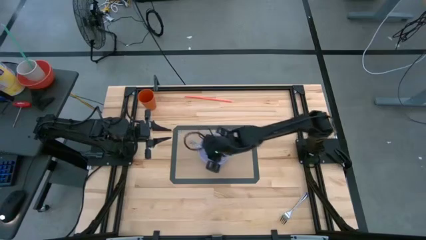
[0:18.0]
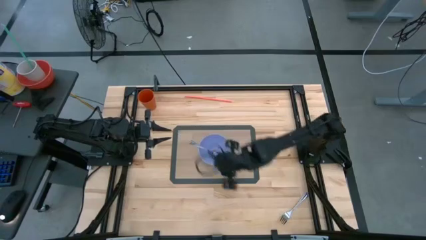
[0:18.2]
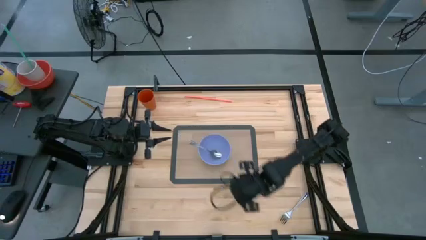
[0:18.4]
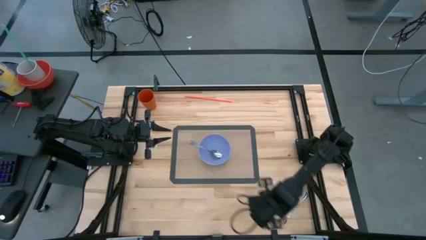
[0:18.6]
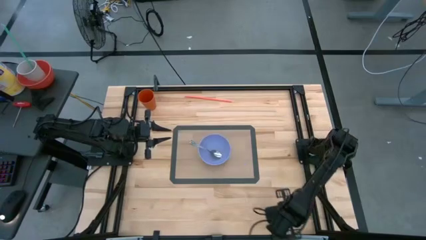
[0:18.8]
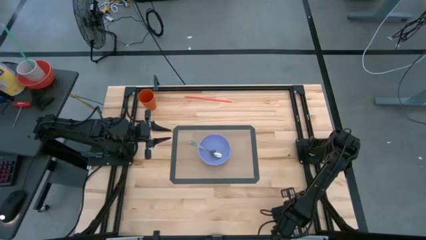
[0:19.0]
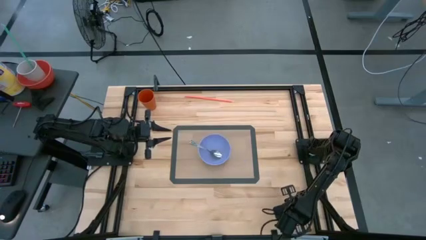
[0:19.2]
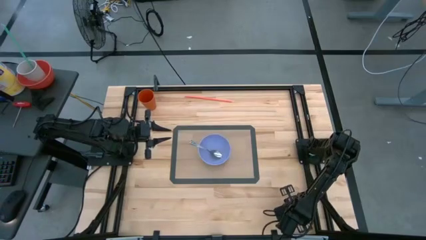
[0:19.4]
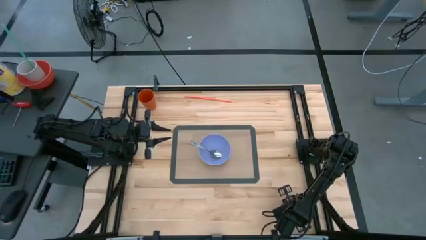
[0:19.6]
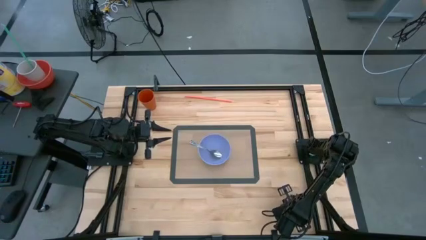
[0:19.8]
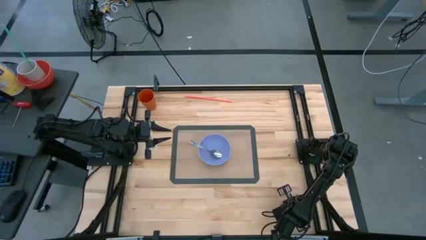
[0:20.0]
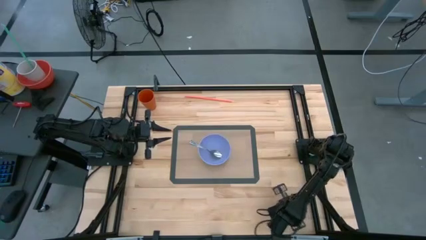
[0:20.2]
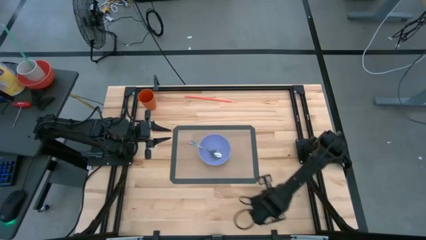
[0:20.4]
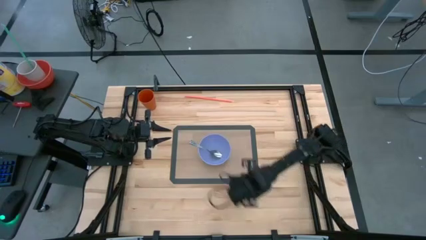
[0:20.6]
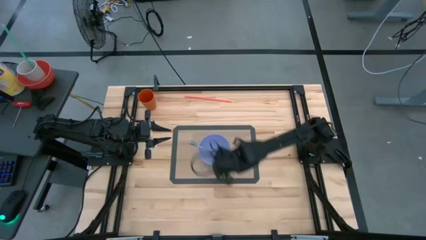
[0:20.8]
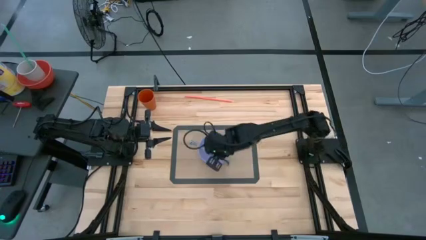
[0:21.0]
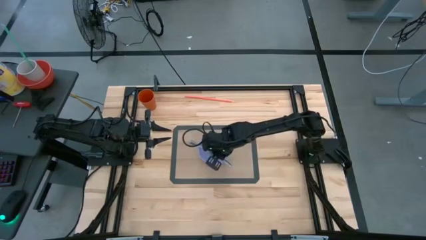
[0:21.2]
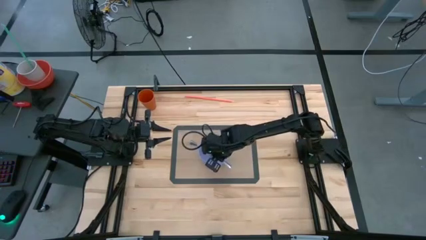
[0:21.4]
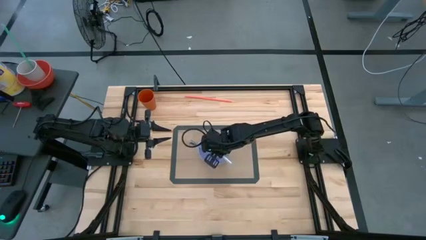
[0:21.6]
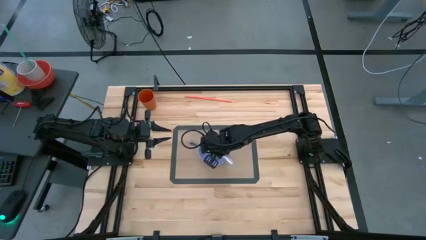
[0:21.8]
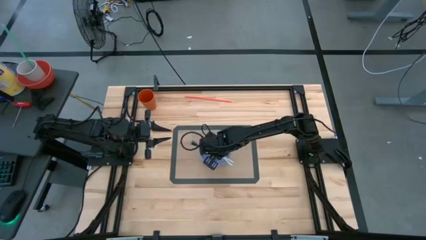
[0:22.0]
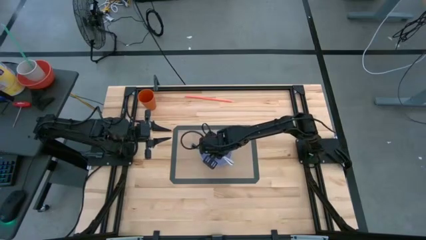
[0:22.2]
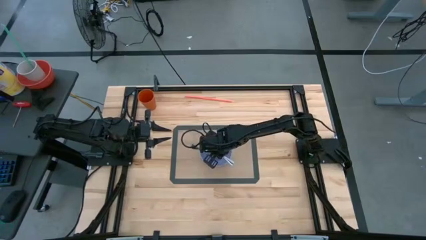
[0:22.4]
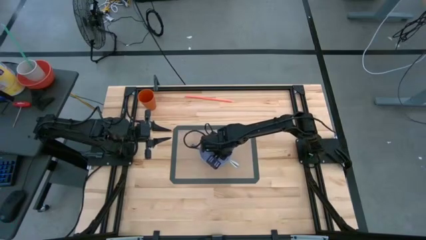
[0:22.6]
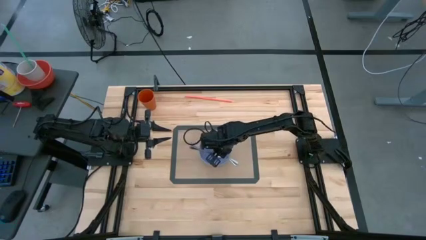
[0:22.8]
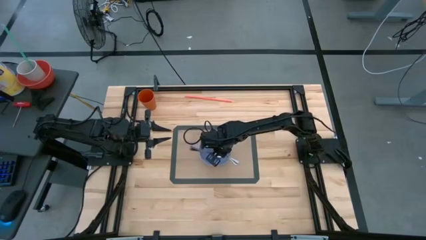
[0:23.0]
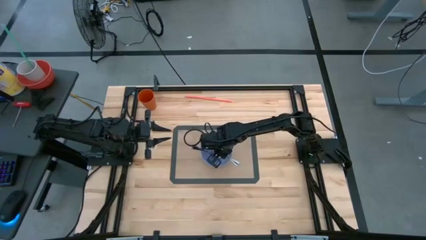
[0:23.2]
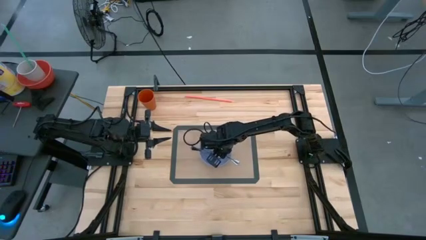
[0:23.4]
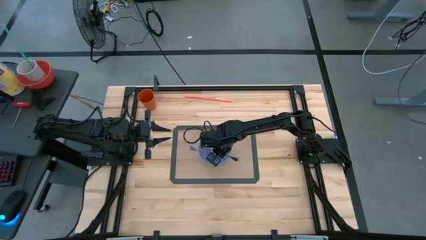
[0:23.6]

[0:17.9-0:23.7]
Task: Pick & Place Utensil
Put the silver fork into the violet bowl

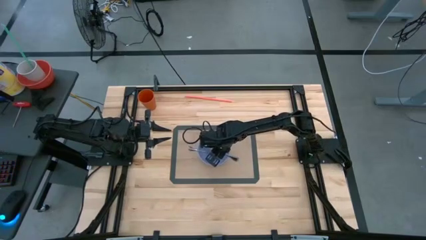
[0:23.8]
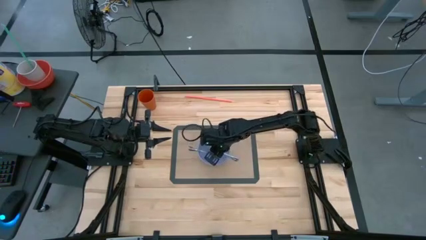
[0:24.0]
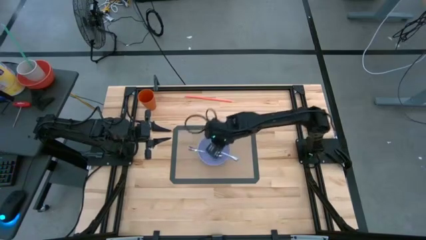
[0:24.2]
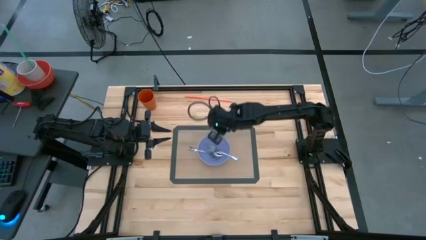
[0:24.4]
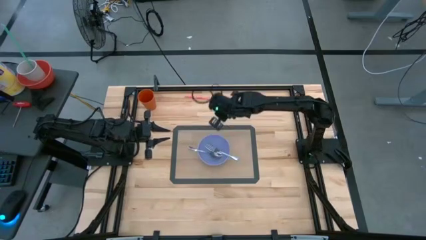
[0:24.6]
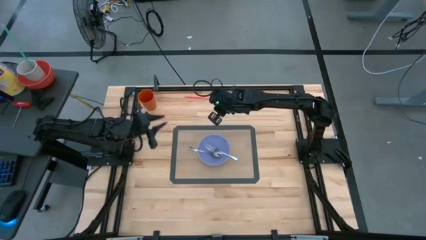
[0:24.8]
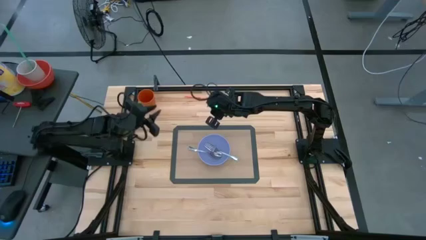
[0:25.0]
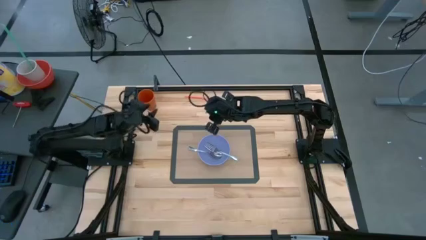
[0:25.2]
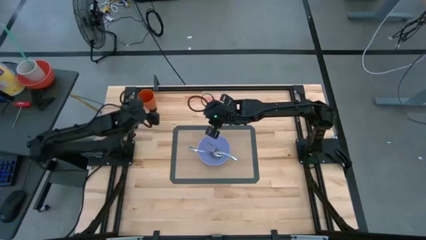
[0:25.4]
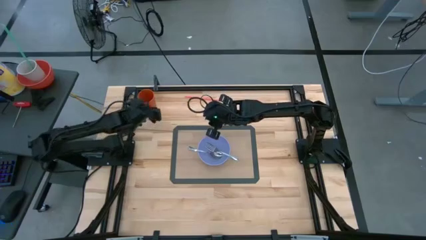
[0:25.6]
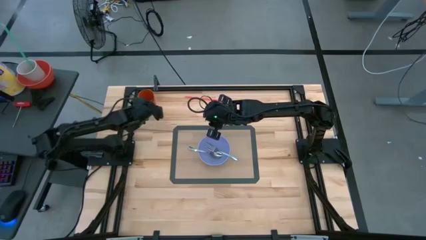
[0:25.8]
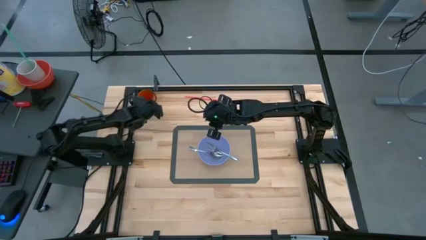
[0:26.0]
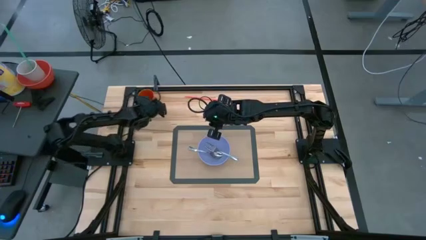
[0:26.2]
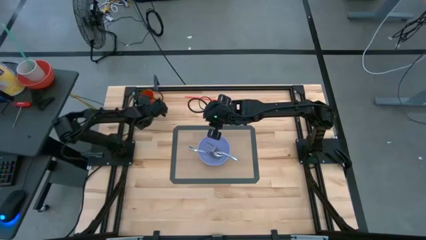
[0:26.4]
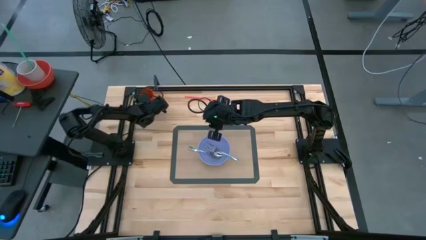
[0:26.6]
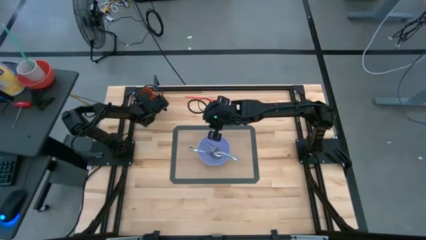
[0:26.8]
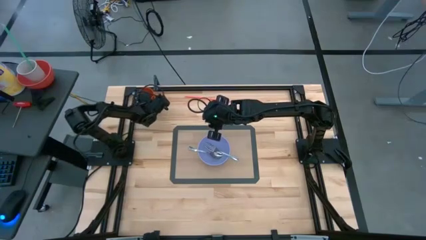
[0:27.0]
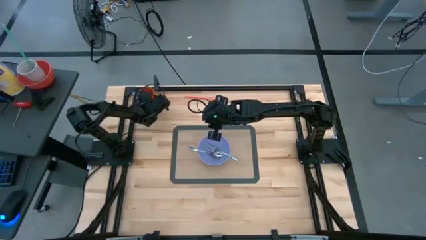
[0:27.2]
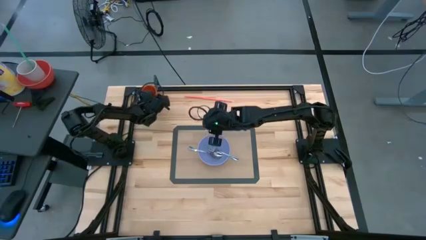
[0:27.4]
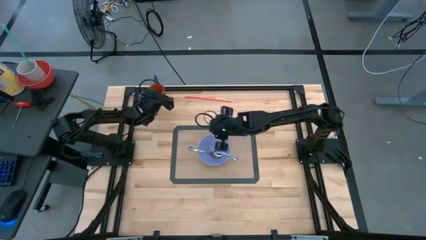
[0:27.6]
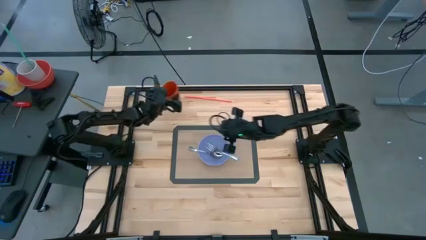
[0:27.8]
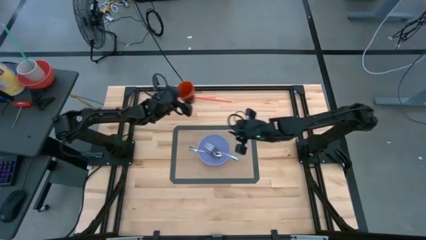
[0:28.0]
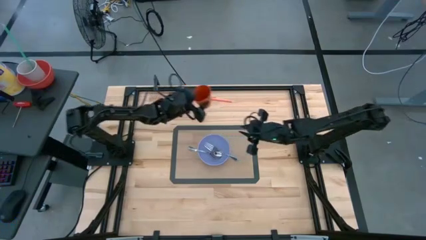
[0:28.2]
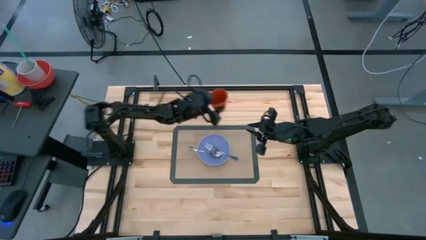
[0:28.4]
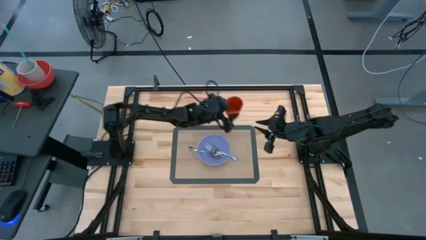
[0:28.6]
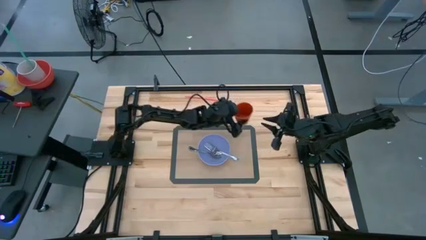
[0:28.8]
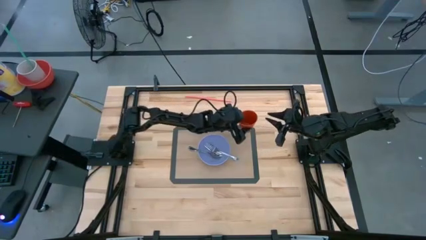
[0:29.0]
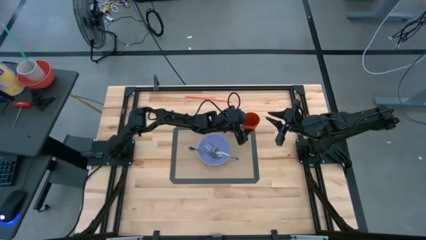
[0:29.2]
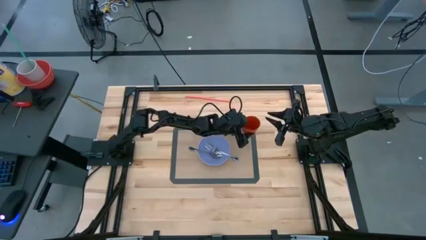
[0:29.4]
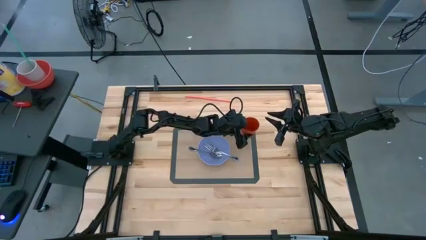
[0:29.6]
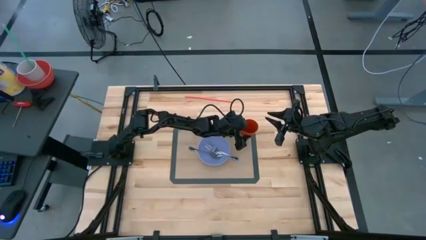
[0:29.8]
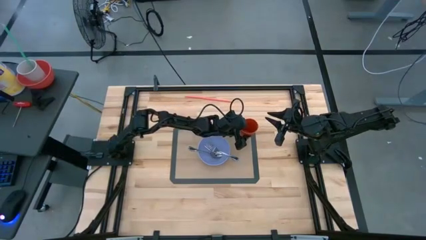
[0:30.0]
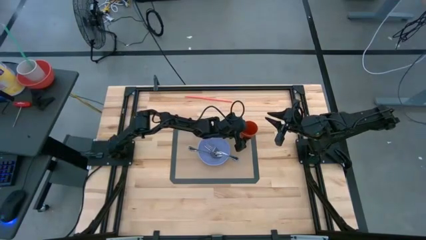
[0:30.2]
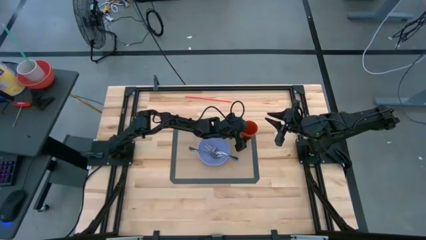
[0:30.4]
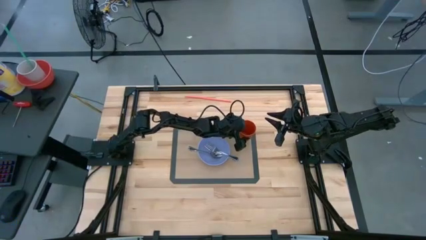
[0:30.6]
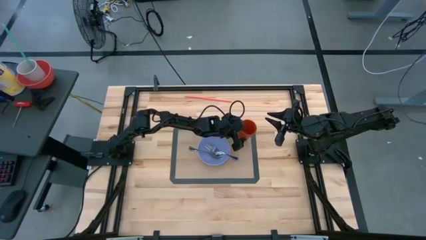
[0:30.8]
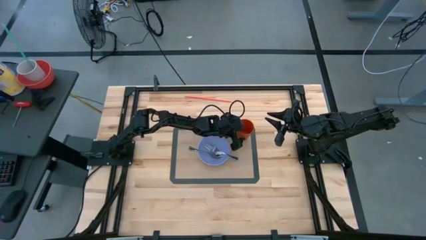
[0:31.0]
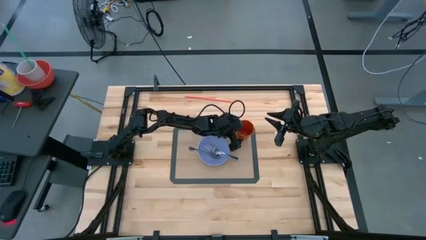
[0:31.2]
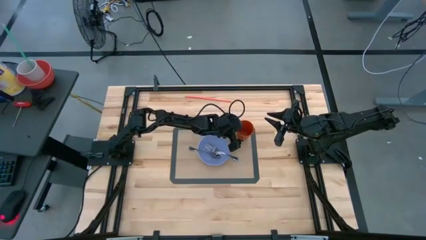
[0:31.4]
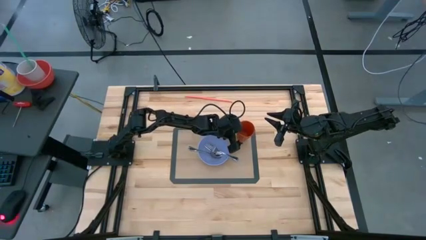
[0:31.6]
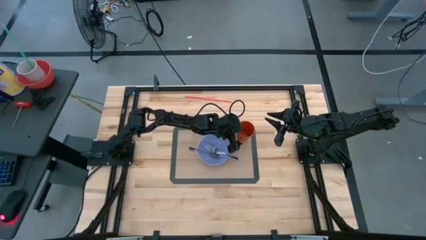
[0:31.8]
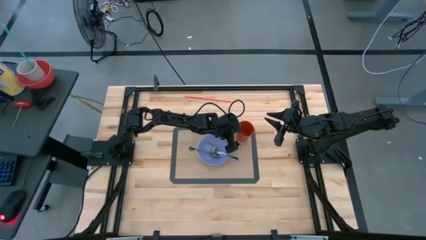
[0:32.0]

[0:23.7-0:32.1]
Put the orange cup on the brown mat to the top right of the violet bowl

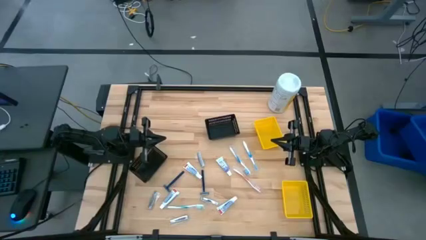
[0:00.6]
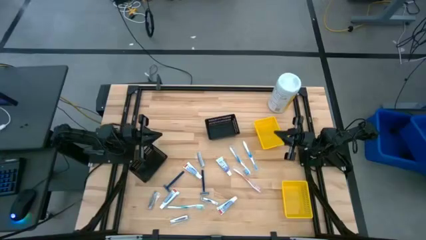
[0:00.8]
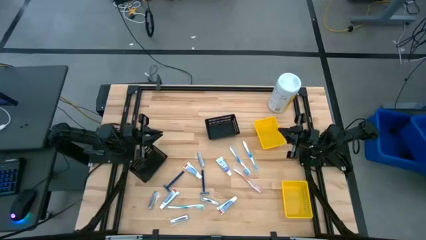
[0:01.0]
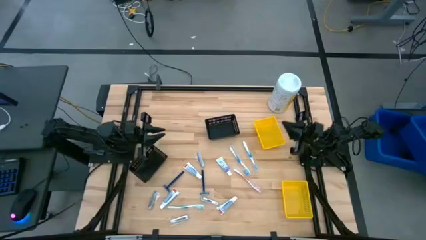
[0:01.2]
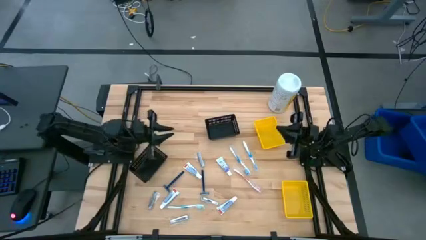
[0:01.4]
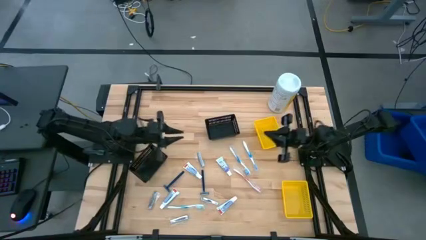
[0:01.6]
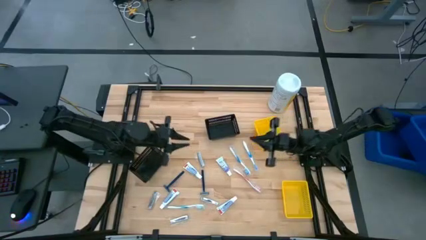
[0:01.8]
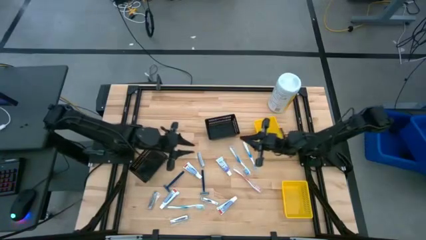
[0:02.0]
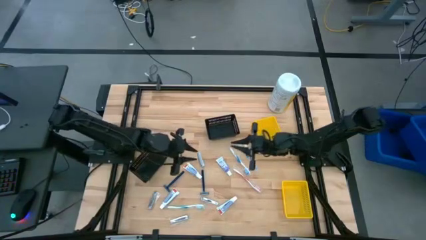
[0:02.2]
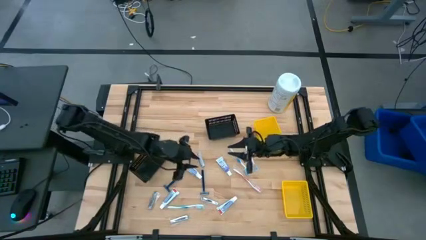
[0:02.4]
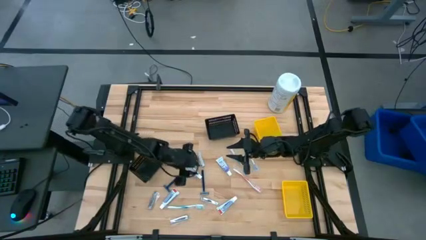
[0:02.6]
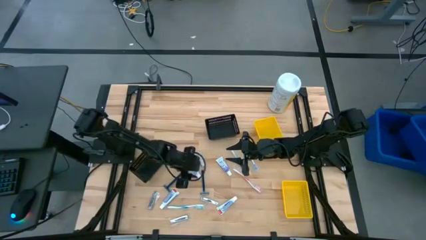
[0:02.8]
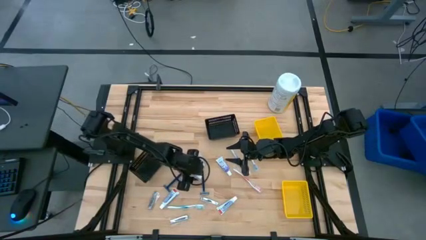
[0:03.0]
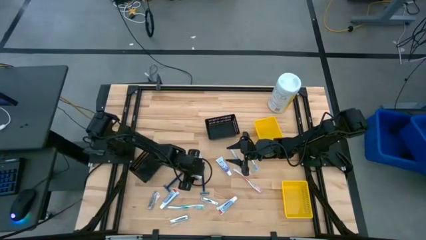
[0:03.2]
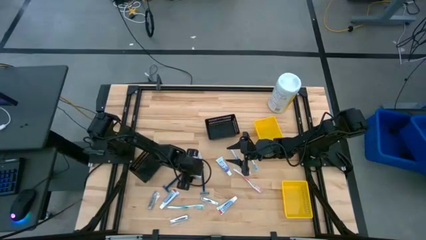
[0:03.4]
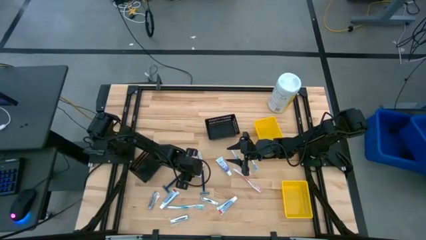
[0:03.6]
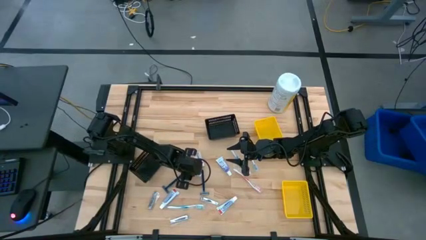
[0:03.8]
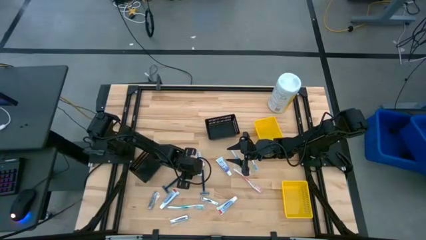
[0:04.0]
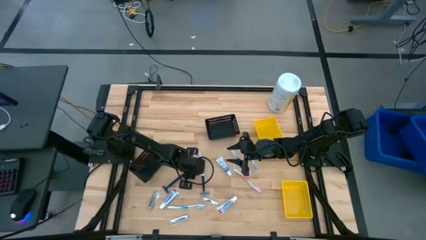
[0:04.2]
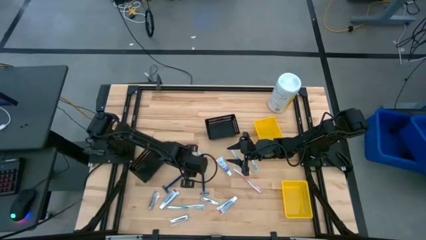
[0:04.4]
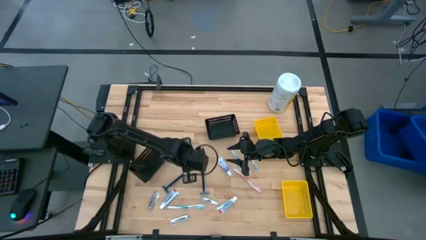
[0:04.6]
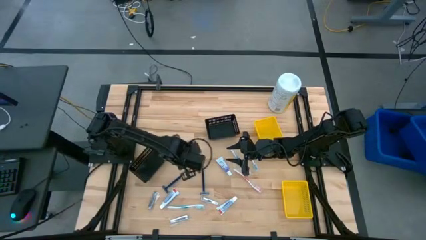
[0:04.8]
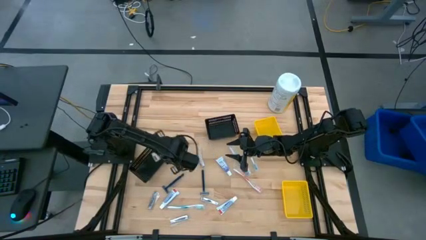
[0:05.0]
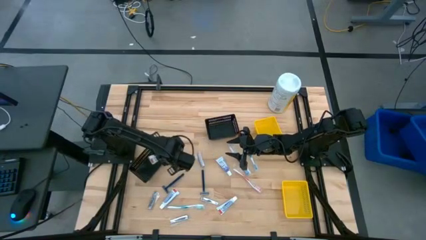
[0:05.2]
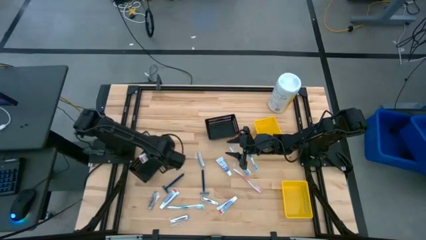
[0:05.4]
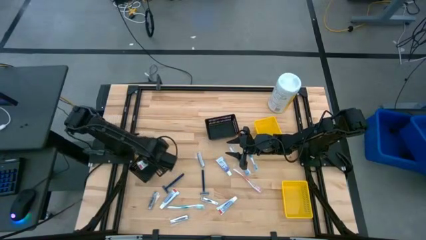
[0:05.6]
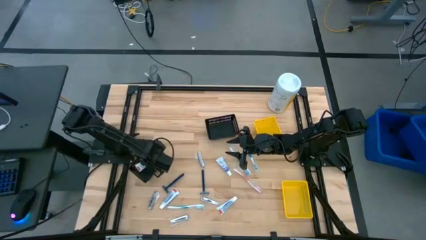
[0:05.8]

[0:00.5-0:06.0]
Task: Pick & Place Travel size toiletries
Put the white toothpaste into the bottom black basket
